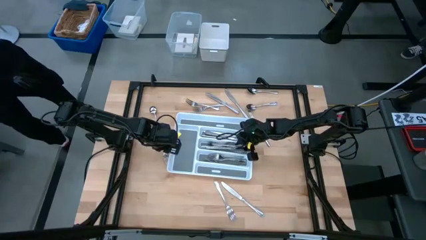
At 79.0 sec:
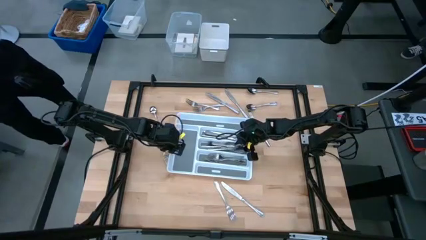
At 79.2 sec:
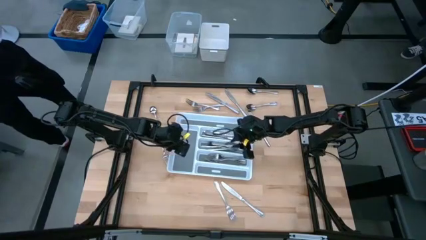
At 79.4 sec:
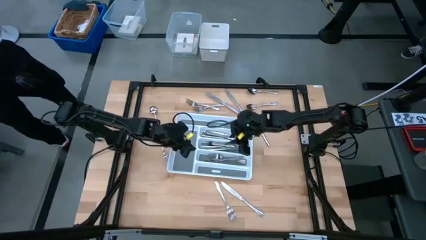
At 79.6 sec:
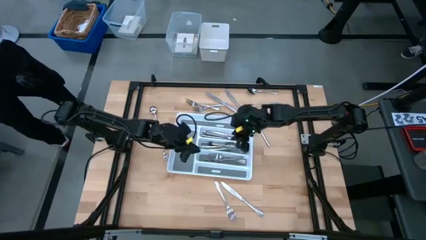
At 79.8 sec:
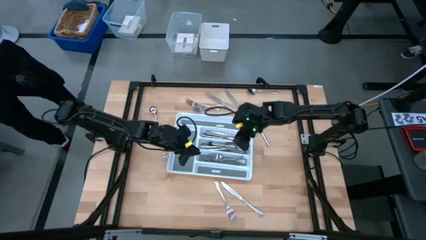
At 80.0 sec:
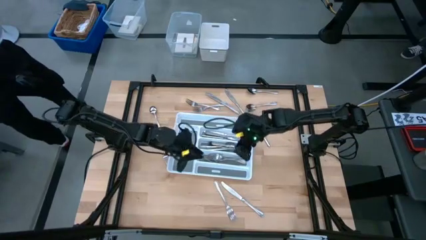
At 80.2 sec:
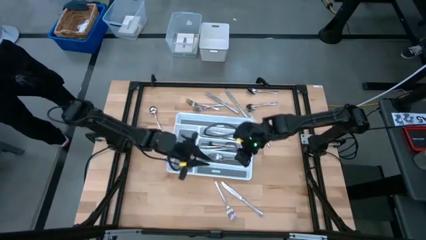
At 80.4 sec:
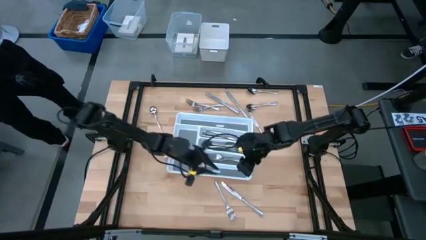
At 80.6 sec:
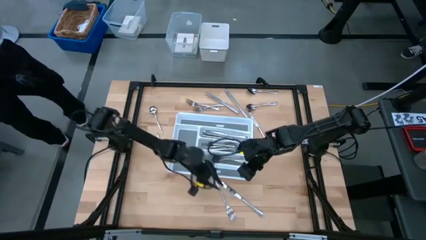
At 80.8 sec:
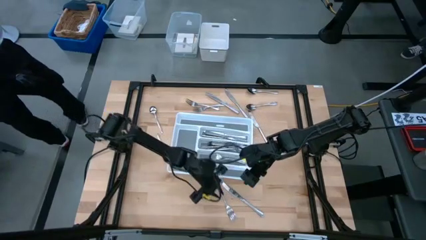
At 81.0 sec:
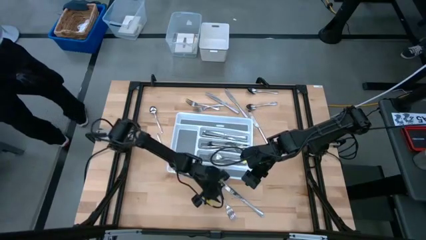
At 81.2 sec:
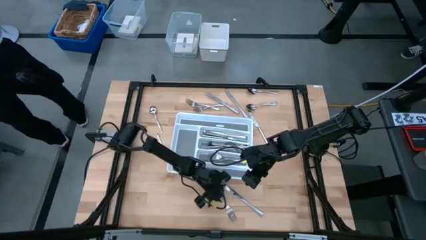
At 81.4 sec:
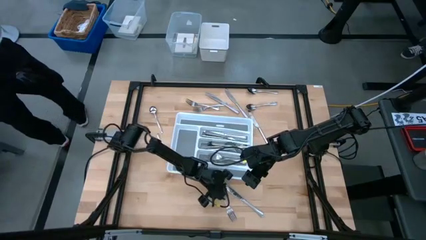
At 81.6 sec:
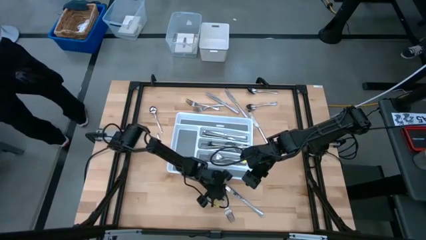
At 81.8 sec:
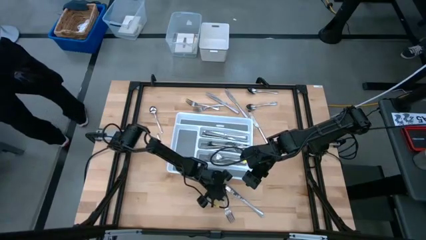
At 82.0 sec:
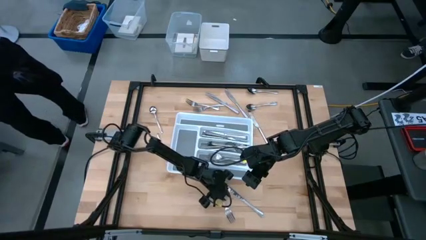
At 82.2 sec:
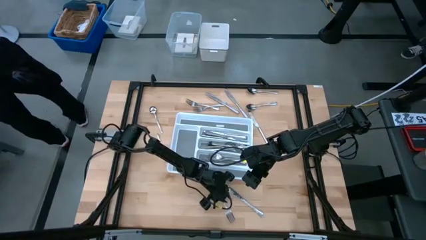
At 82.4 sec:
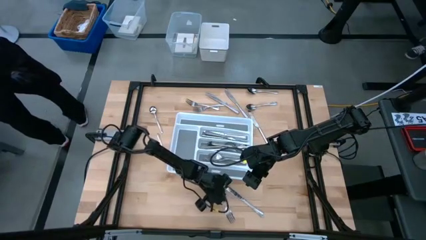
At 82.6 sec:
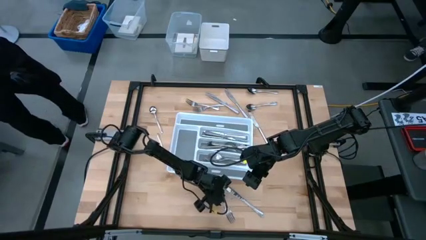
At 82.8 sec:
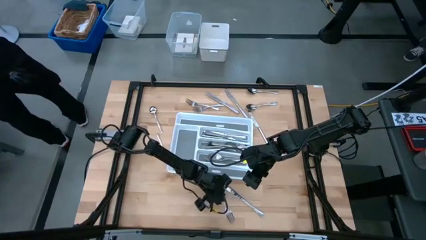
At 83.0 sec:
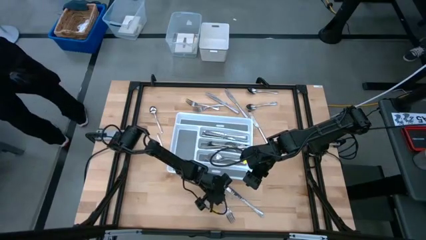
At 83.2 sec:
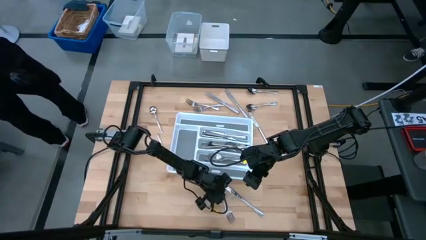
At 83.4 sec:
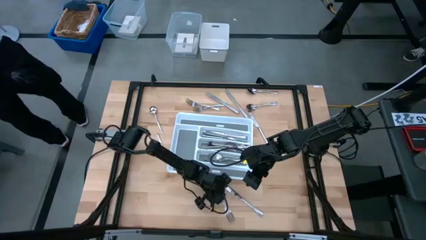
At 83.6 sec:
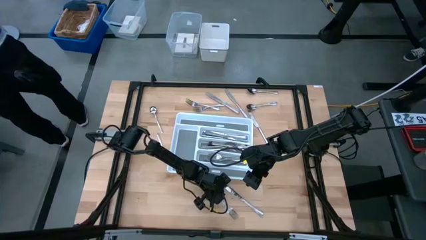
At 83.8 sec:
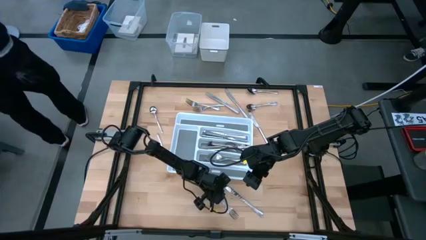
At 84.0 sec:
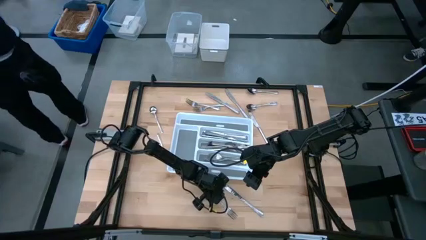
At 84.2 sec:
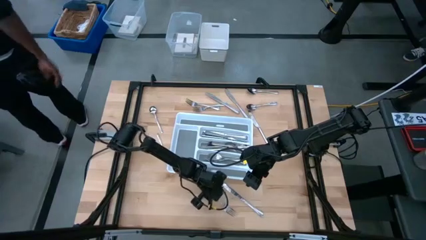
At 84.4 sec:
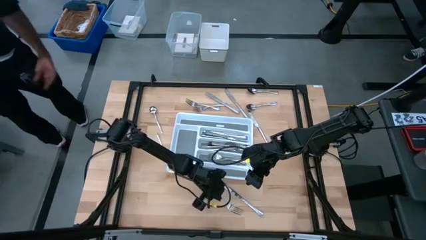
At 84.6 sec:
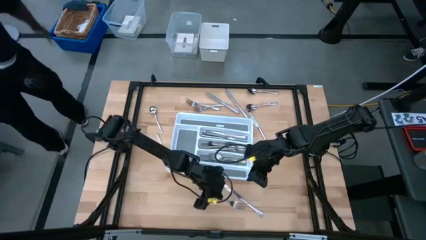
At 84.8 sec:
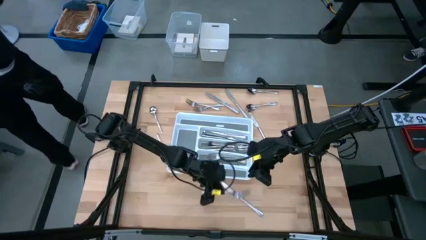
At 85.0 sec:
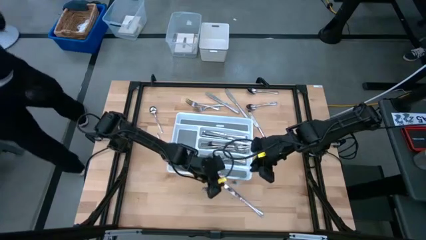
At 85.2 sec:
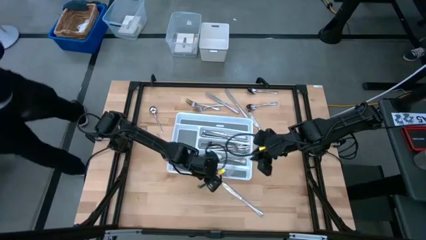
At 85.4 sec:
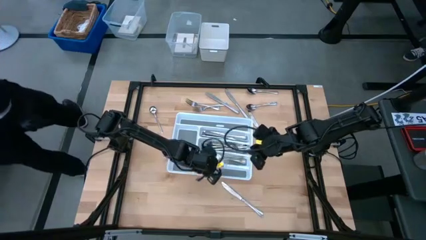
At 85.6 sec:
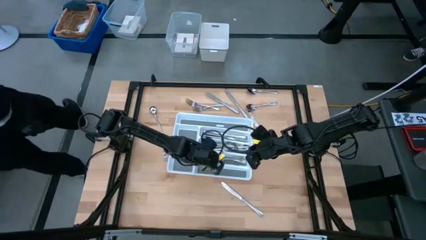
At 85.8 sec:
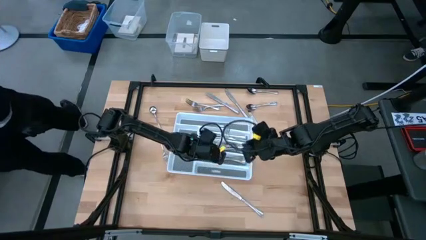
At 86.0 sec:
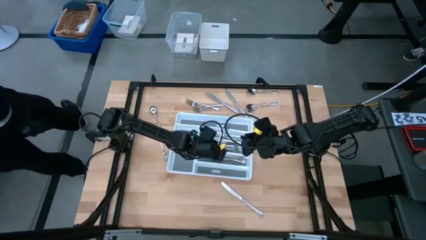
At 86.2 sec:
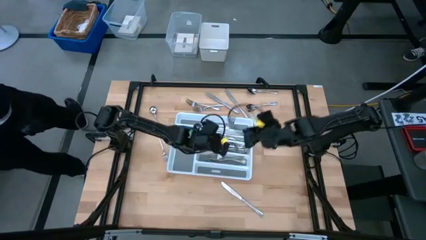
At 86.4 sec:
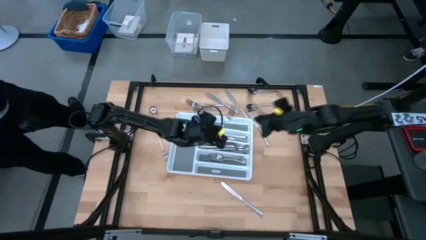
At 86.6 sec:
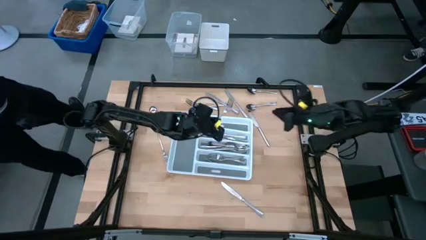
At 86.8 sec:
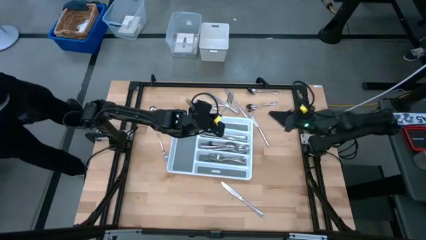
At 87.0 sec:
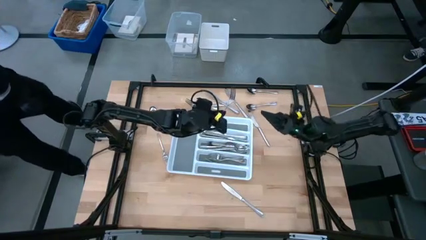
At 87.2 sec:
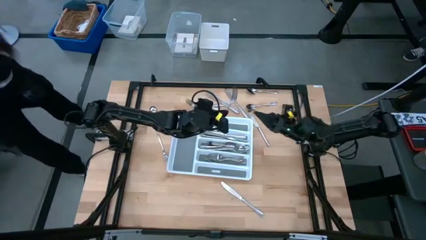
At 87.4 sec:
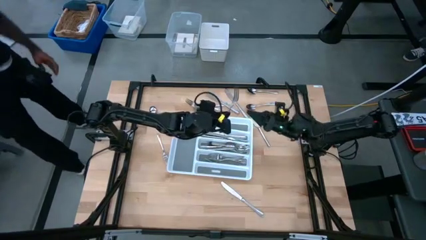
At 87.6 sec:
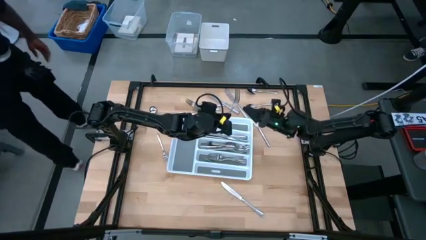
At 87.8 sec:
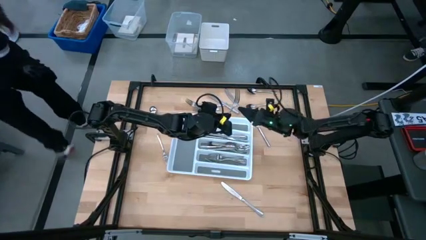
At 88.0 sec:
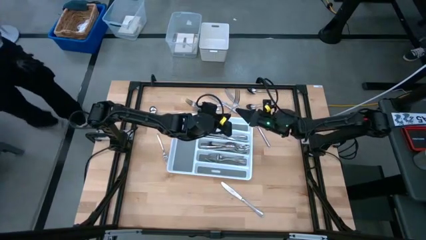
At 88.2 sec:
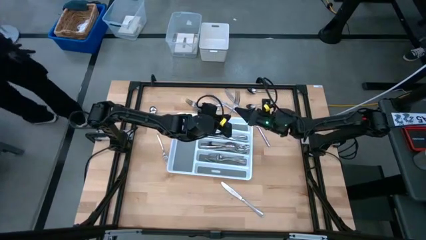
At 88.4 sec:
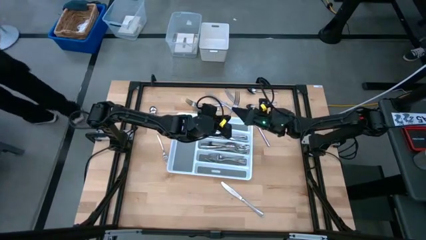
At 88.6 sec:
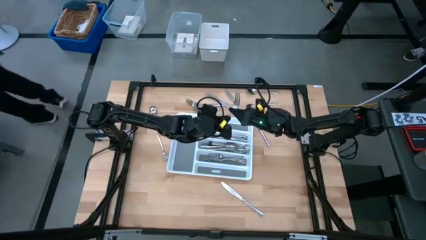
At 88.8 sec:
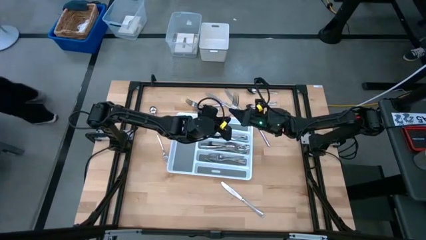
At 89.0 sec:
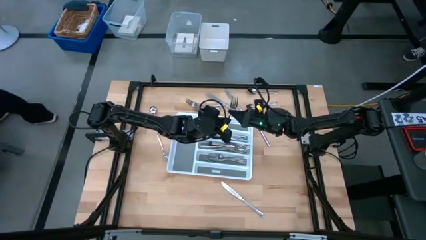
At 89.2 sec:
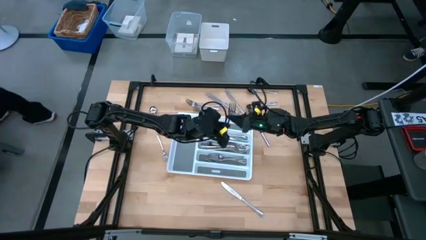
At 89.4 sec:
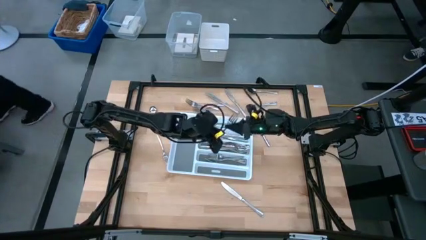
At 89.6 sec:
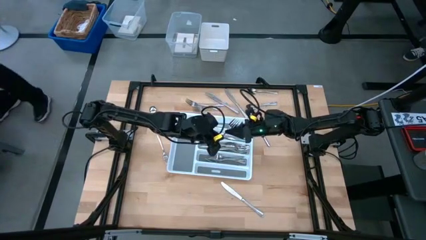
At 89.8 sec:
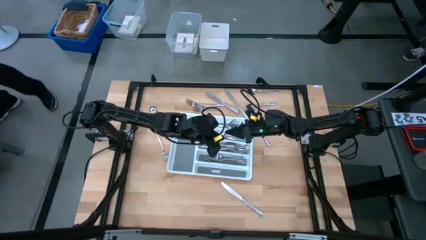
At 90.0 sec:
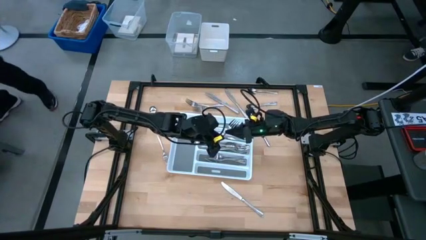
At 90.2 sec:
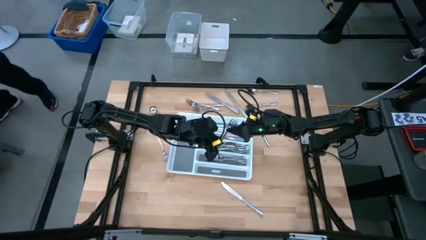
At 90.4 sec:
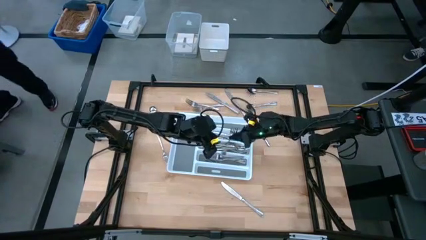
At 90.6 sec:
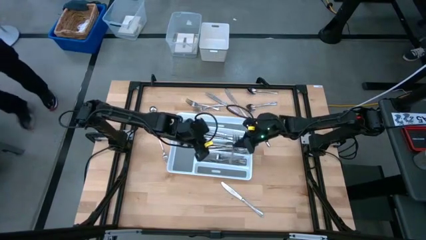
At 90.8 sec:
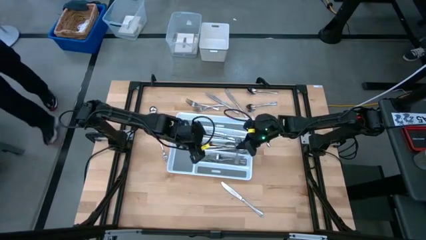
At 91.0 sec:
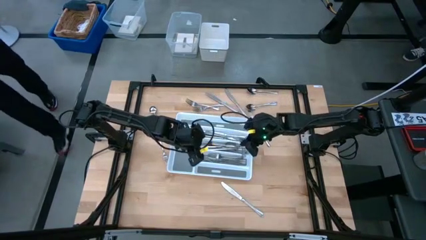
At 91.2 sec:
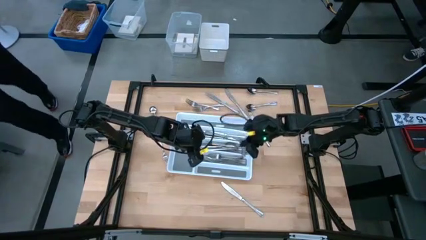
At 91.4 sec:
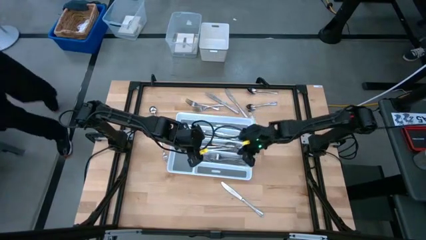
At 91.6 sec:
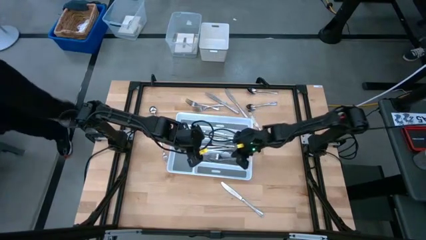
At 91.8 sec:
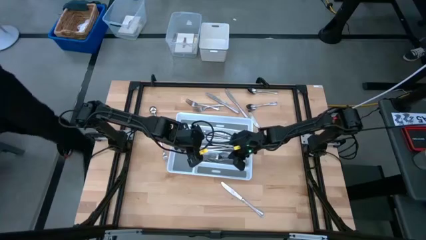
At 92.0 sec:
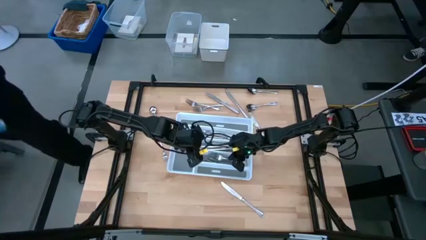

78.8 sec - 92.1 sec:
Task: Sort silverware
Put the fork into the organizer tray
